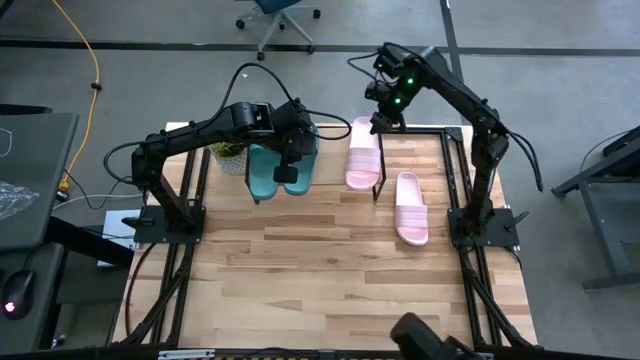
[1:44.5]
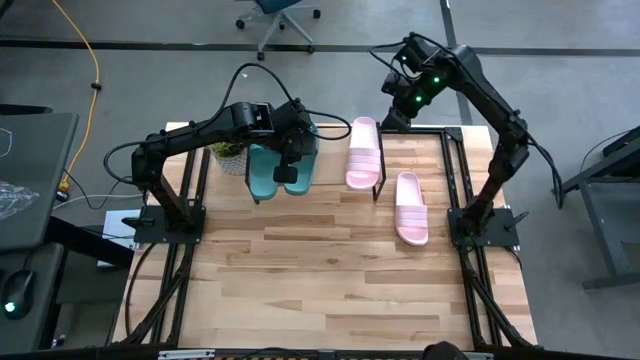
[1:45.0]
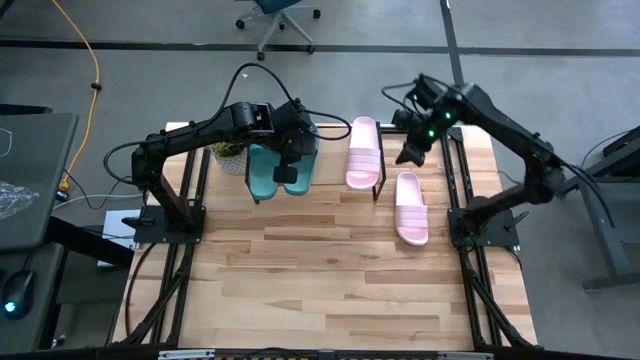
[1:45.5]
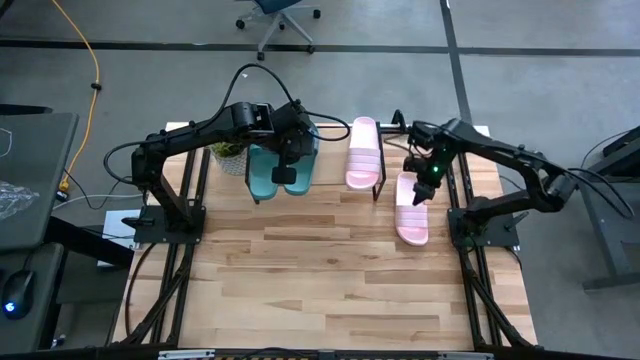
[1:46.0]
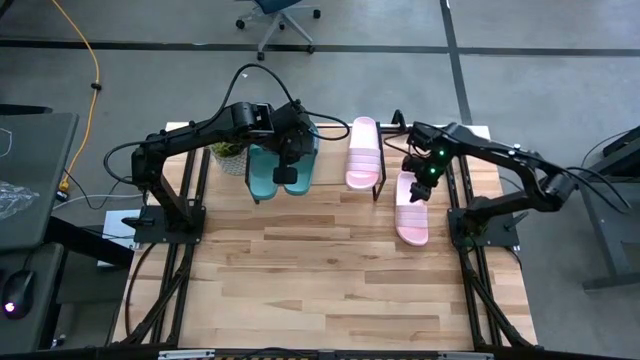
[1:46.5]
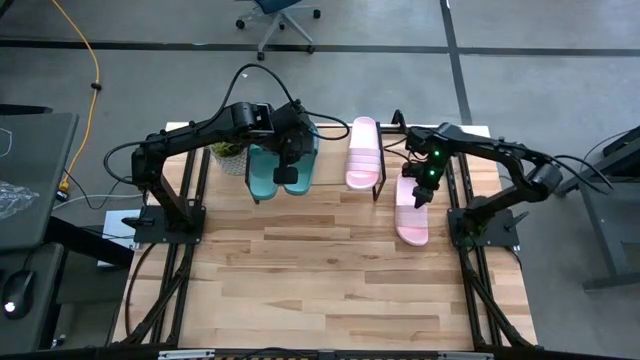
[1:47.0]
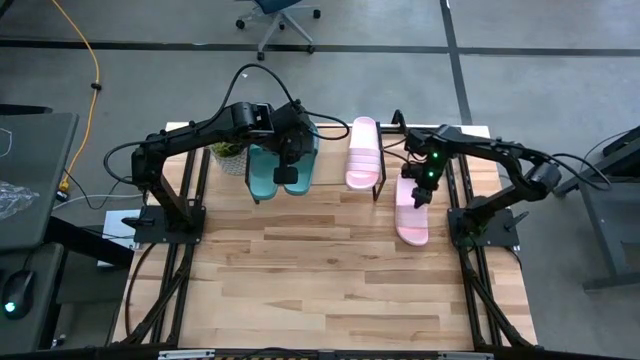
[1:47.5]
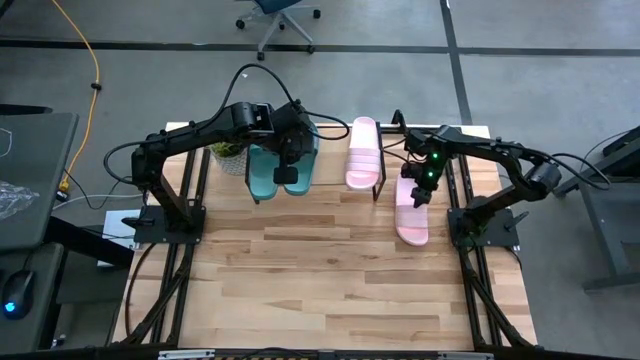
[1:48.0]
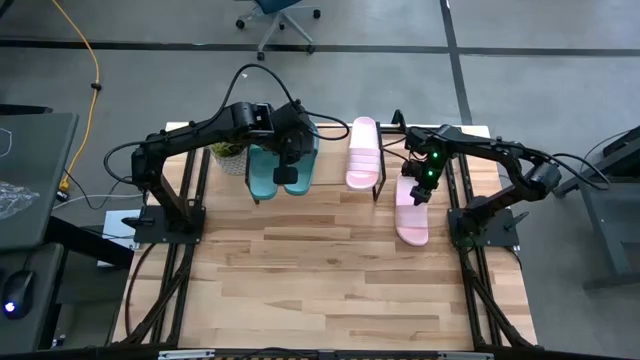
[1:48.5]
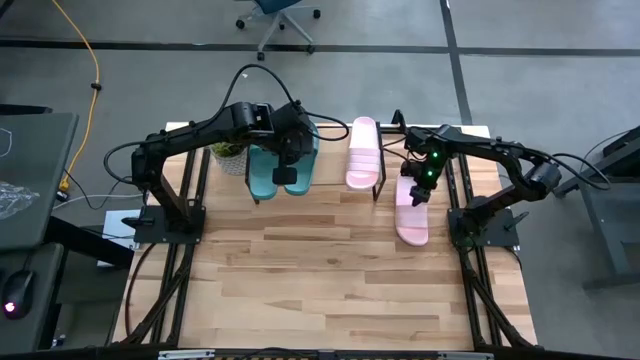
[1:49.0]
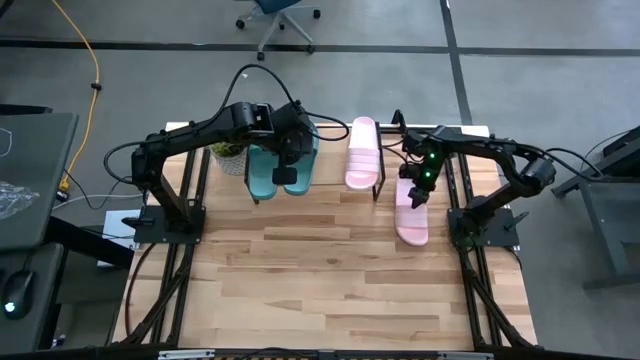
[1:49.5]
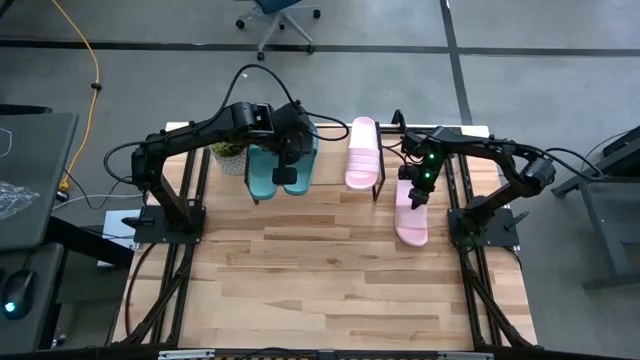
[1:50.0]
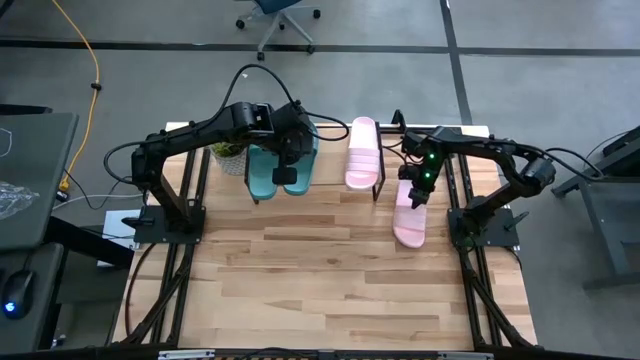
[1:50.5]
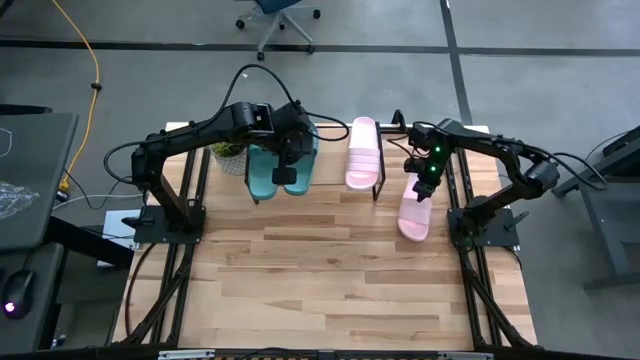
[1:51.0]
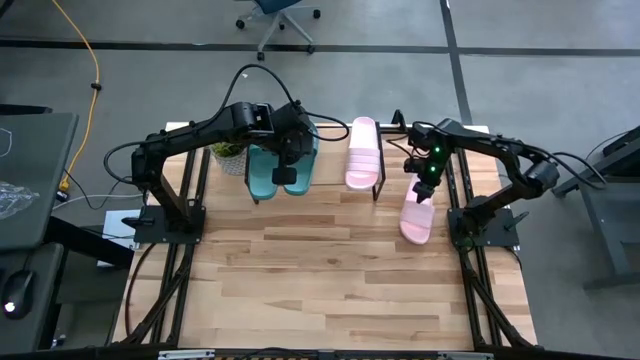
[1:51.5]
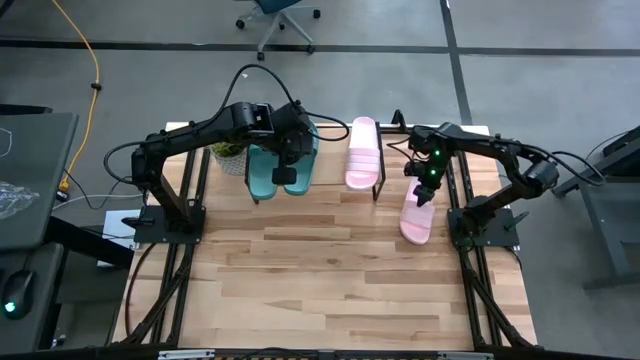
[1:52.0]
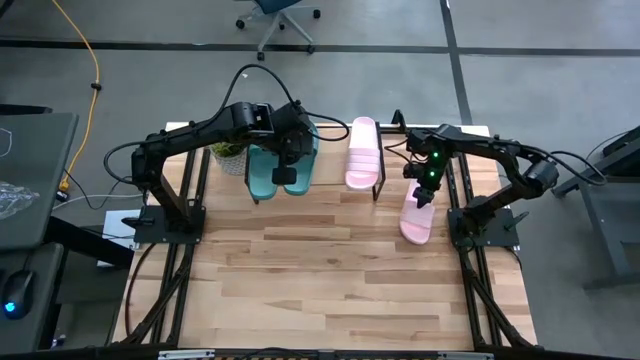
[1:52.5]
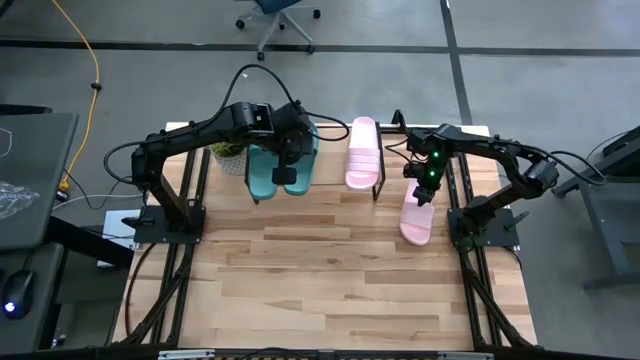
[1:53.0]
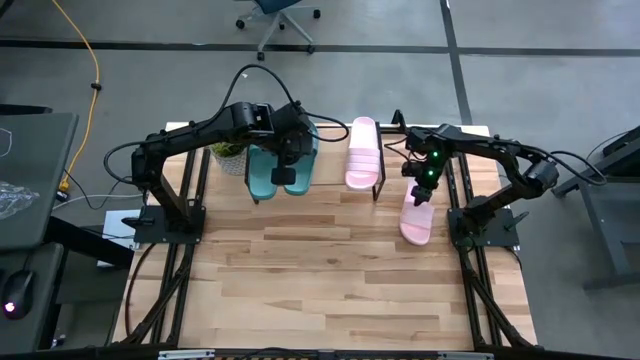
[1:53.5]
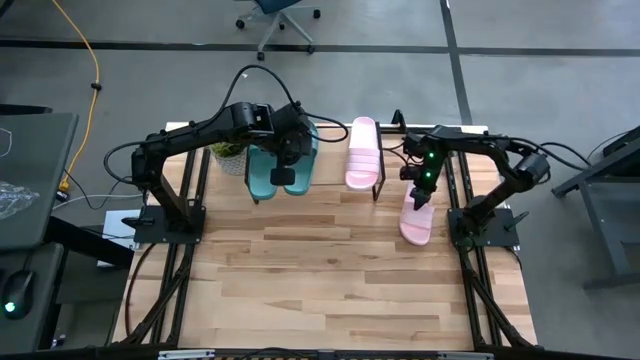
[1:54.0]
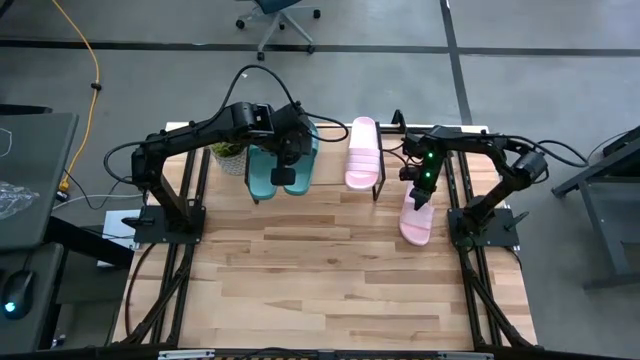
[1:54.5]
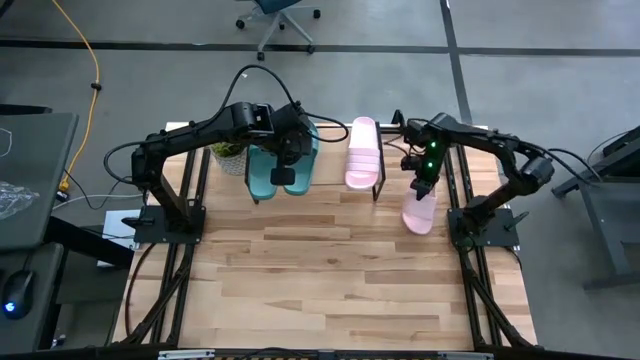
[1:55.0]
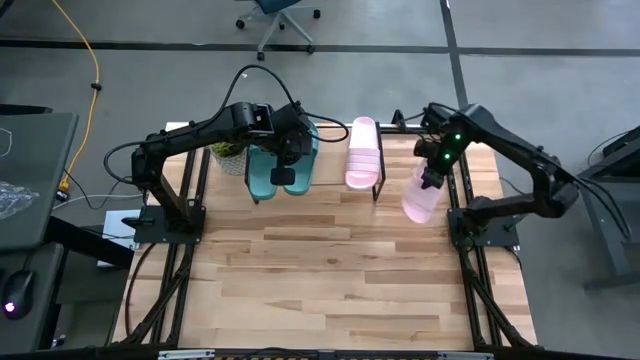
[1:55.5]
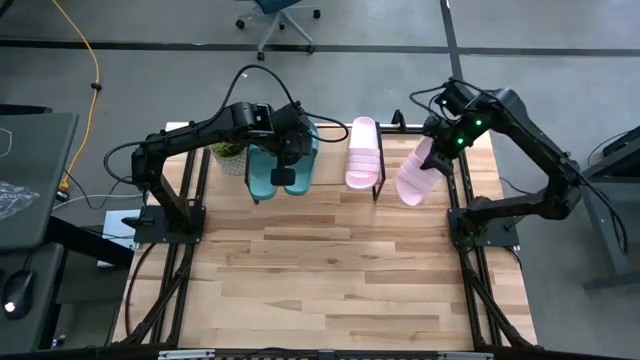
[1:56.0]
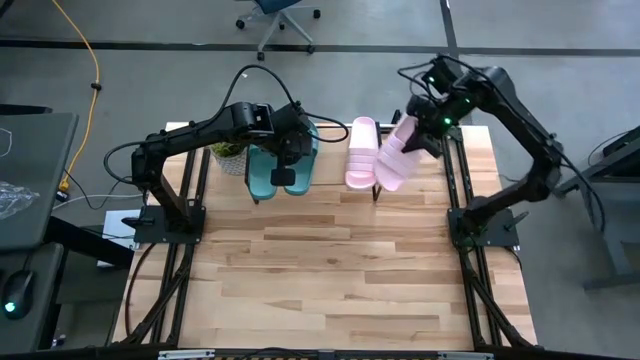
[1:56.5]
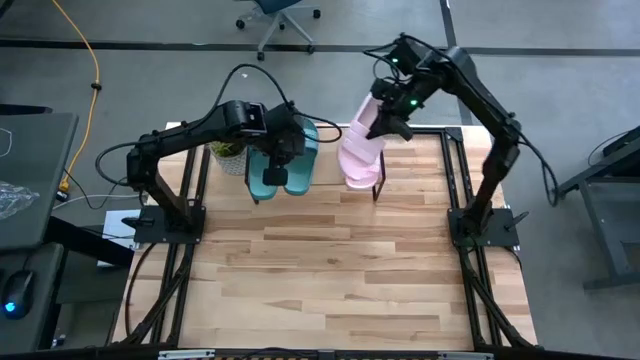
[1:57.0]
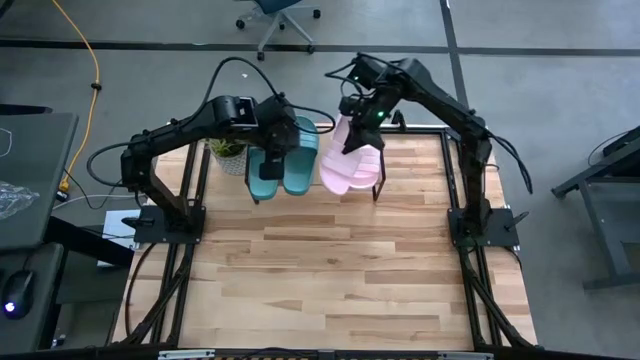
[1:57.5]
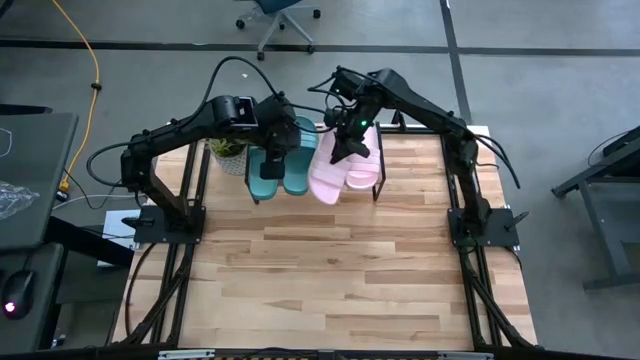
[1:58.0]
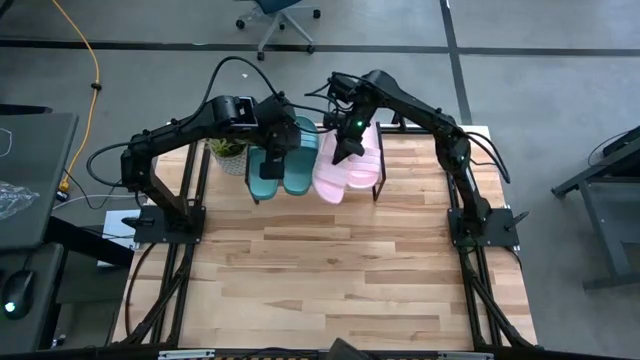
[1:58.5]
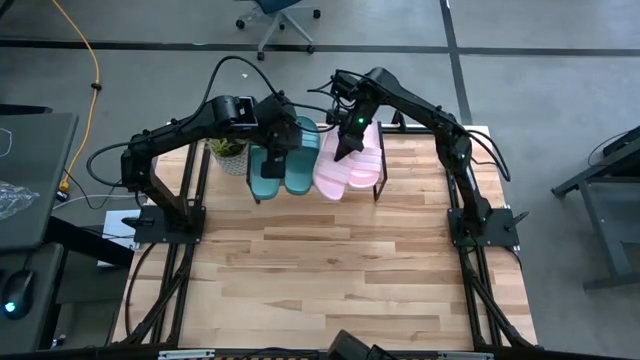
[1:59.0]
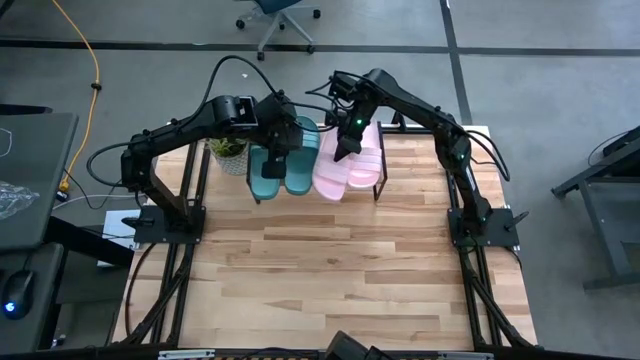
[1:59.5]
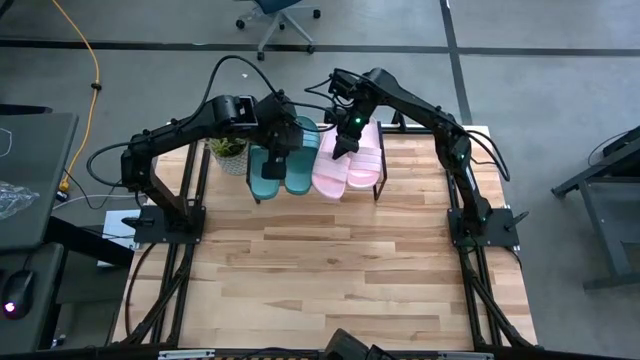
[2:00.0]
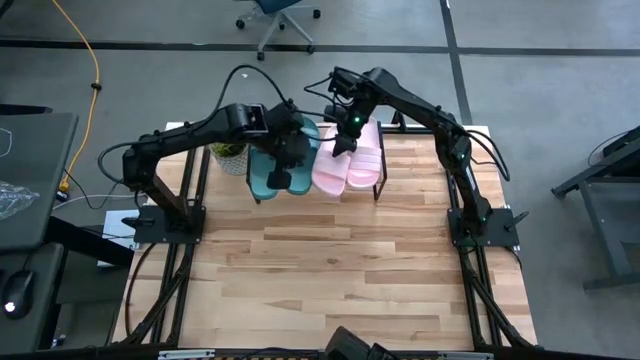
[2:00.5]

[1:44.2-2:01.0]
Task: Pick and place slides into the shelf
Put the pink slide on the shelf
